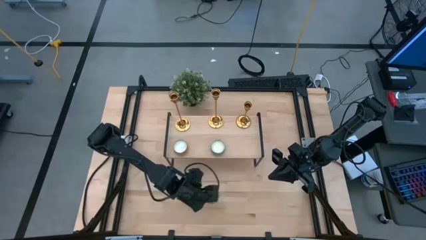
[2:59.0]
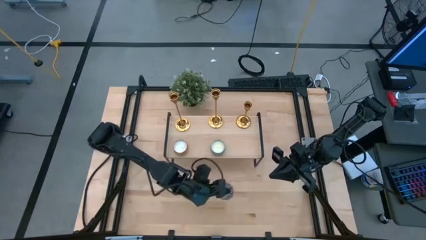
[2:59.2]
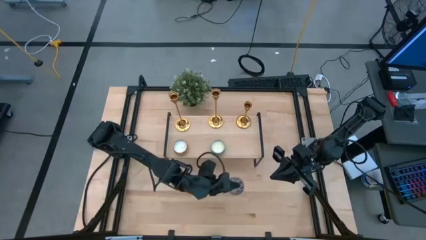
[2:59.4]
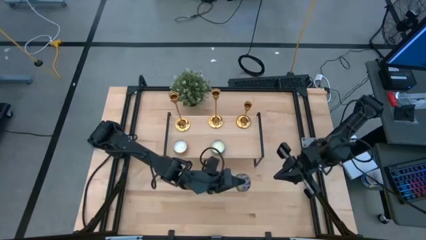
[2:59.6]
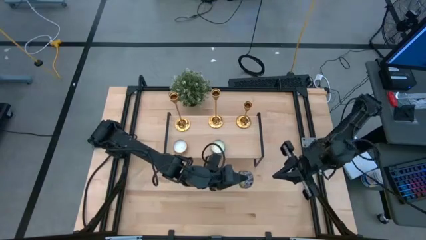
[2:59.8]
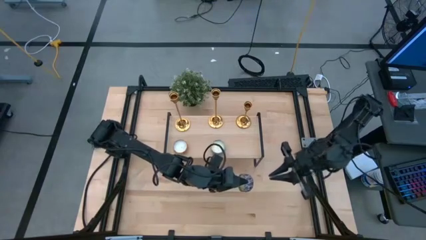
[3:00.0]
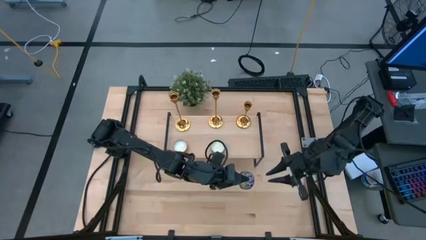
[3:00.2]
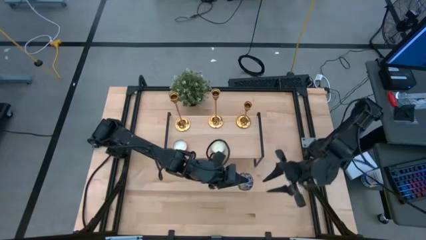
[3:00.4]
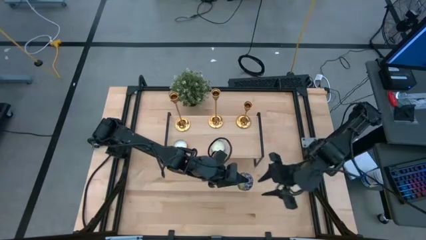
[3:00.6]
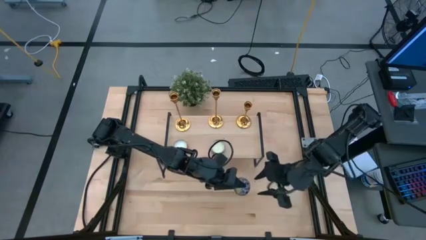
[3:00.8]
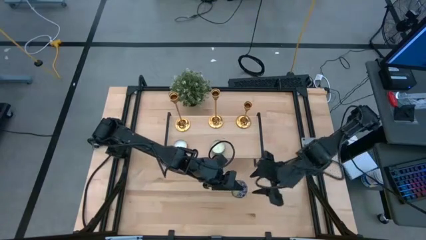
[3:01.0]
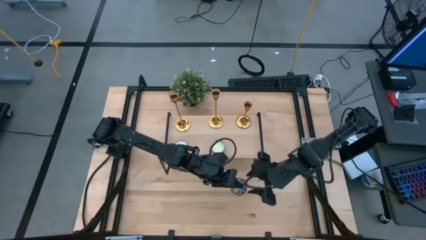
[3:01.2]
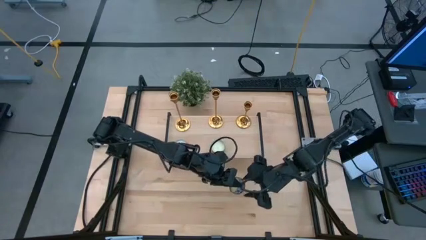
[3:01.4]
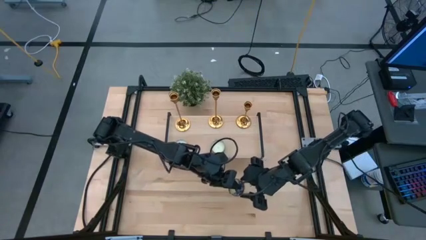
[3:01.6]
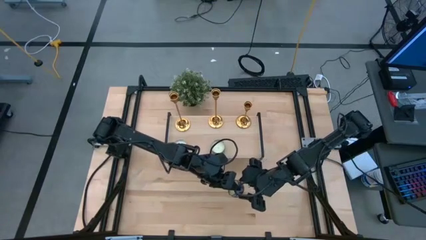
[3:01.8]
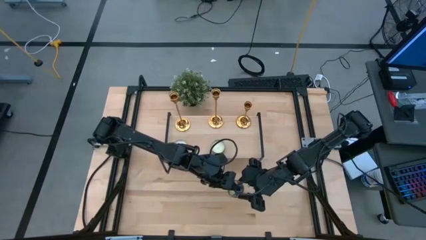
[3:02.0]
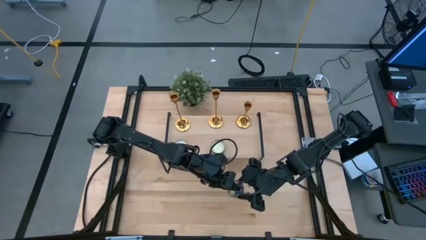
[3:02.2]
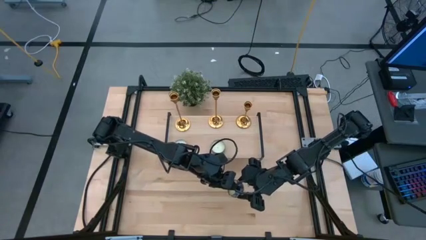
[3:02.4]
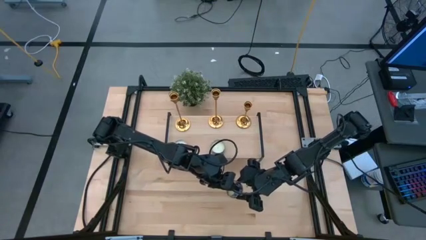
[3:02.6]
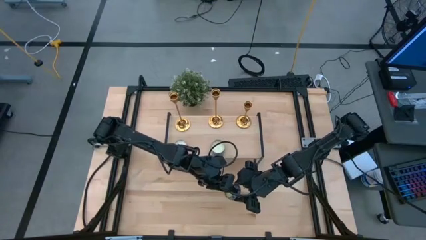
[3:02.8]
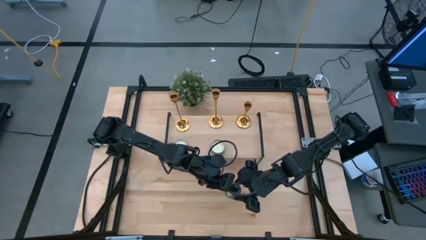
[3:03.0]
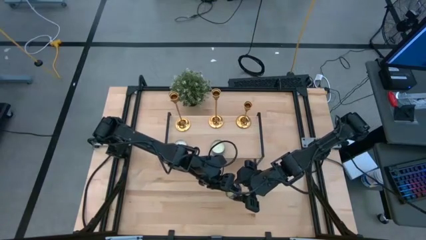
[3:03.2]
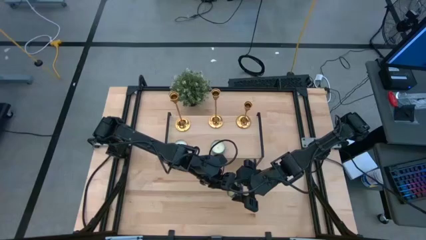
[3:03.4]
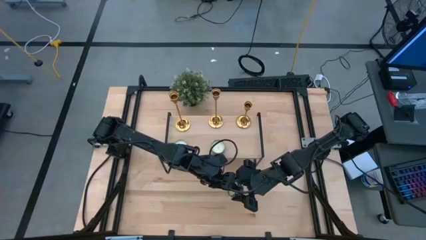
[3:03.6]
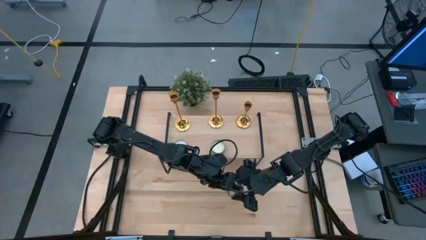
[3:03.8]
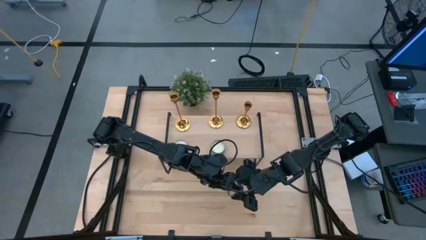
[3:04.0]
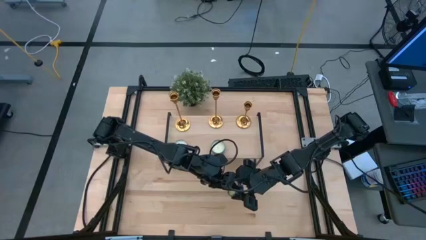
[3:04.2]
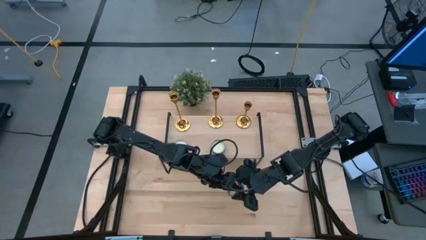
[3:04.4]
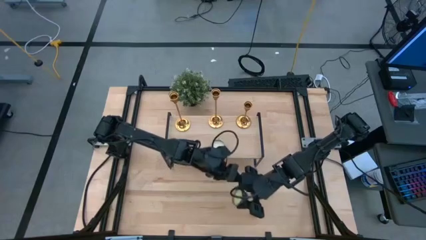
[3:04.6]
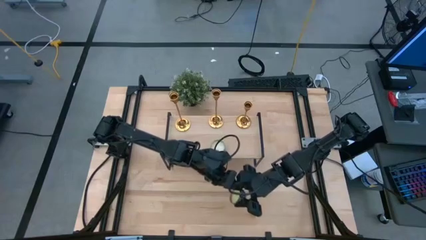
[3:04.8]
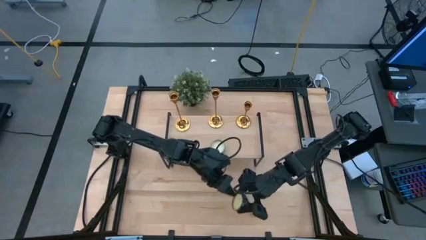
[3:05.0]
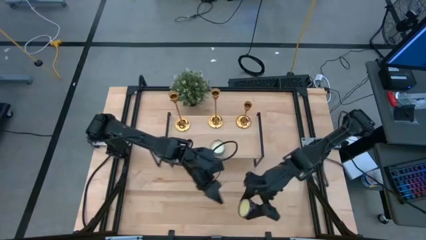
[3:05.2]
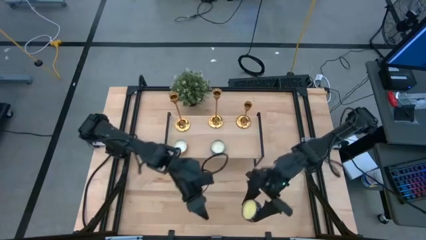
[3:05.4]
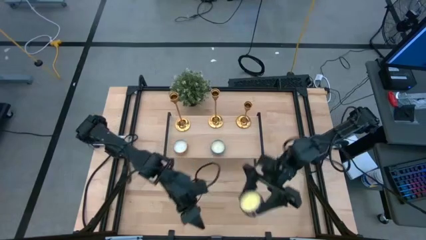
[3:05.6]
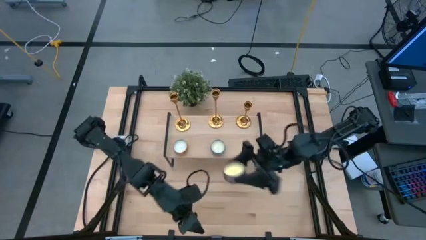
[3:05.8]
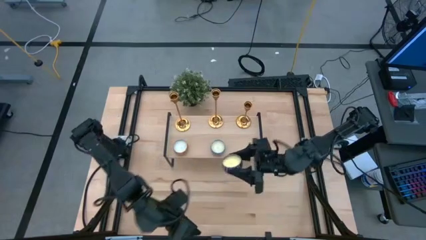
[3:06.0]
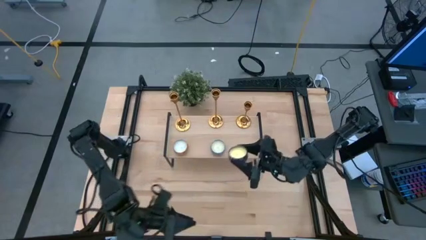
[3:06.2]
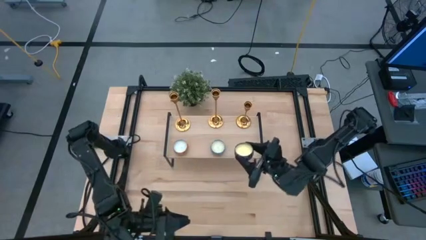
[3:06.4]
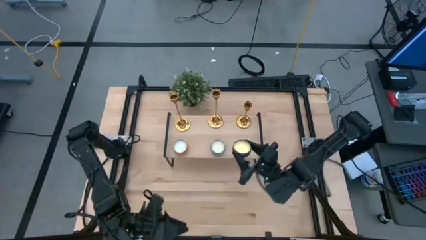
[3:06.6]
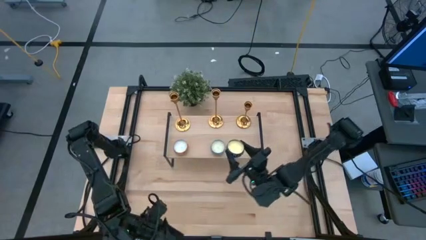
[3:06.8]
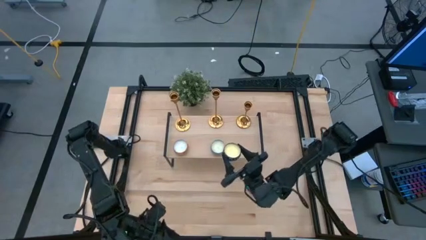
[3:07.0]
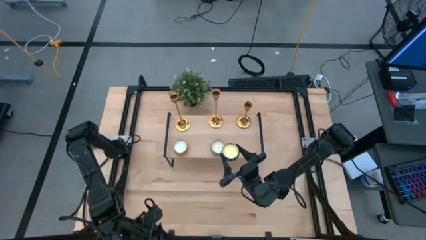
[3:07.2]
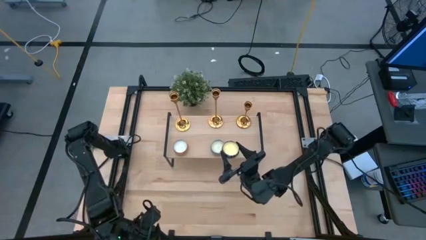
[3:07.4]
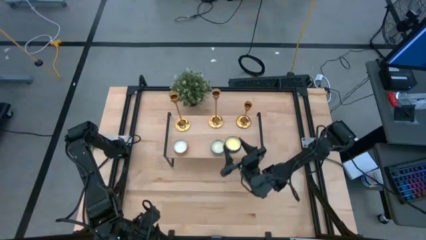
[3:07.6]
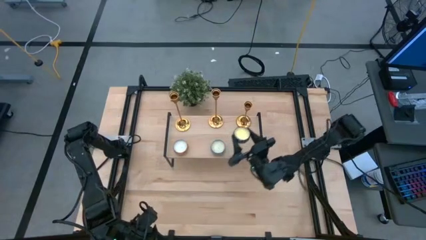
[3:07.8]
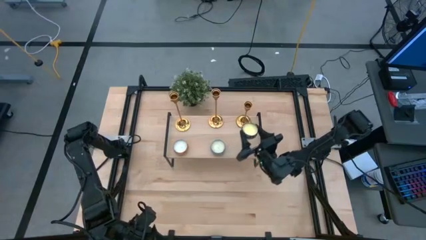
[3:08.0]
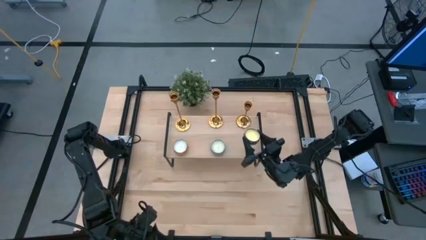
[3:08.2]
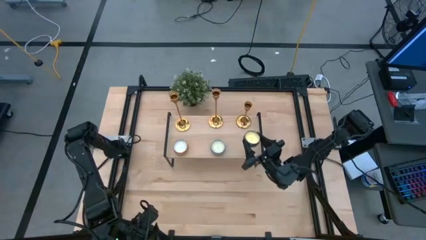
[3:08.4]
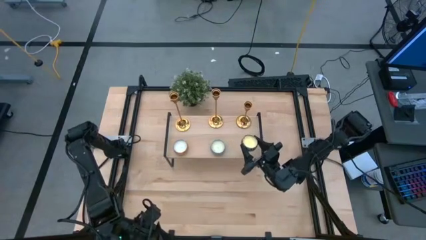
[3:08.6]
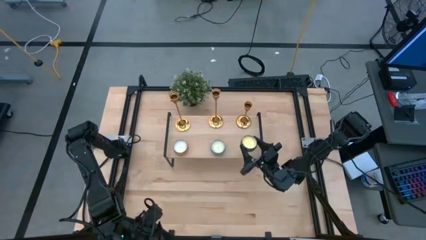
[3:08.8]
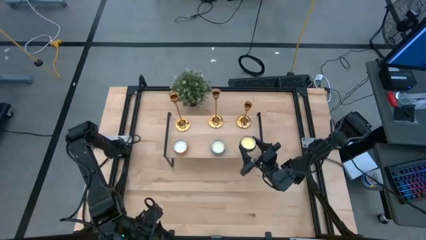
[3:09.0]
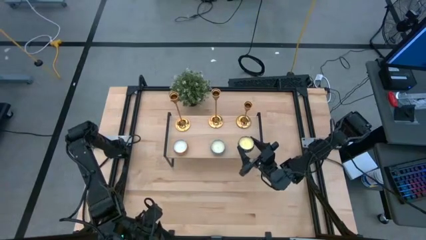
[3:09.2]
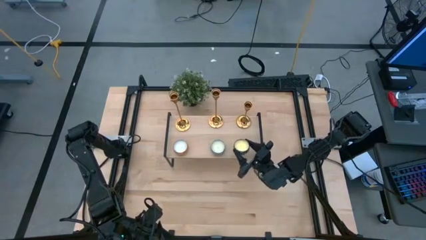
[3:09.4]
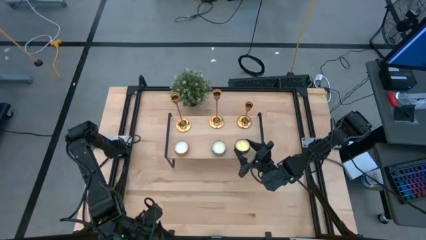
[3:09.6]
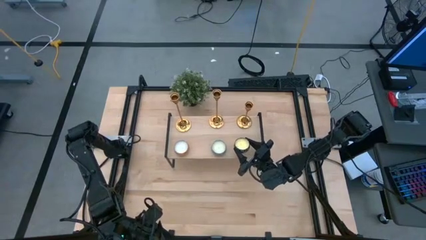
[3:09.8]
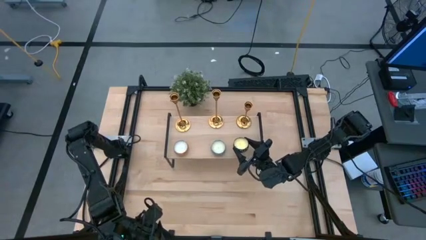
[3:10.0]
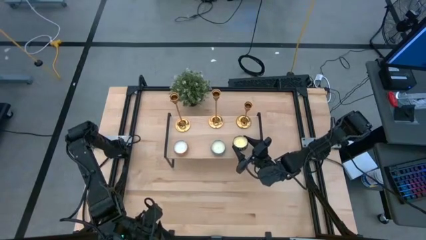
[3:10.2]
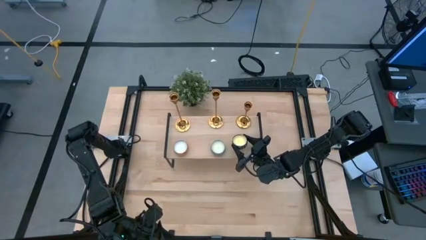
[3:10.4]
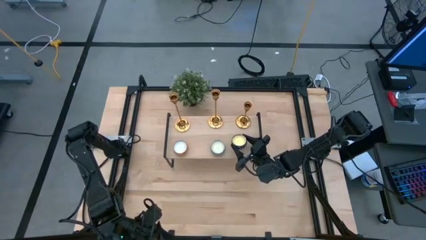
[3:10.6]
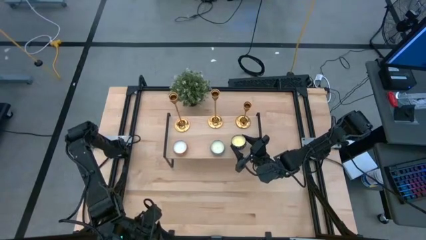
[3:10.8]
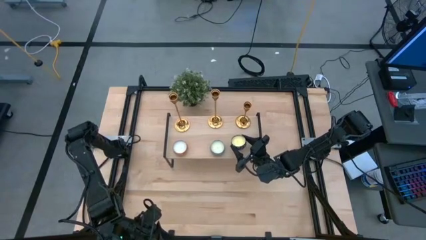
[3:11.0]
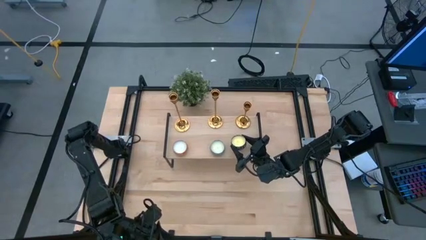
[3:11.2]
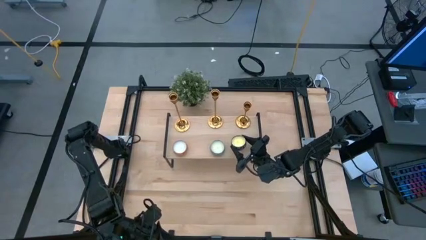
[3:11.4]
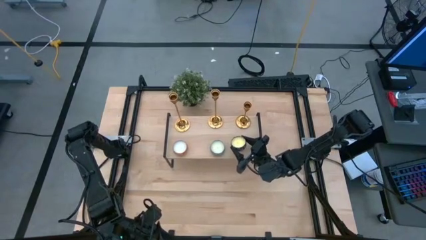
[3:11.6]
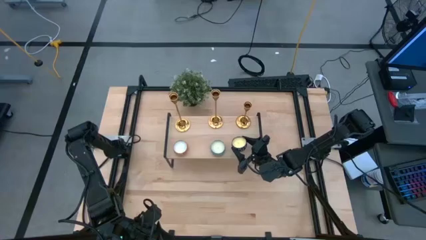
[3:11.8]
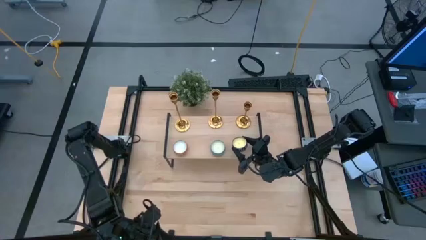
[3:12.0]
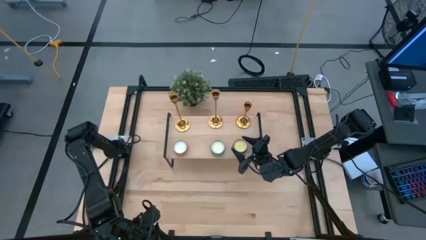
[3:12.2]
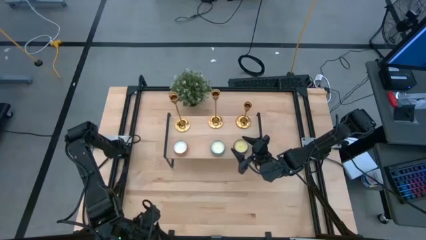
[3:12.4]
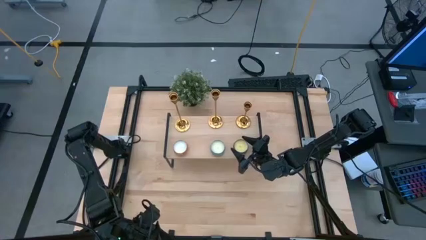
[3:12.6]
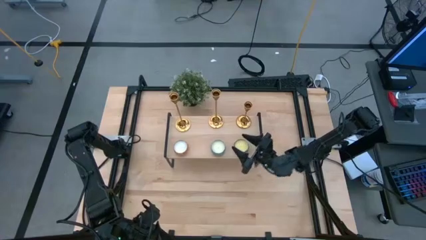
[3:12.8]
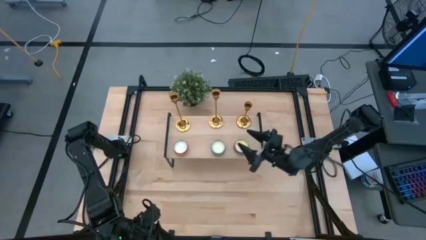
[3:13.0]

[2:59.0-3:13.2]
Task: Stock candles and holders on shelf
Align the red scented candle with the other scented candles on the shelf
